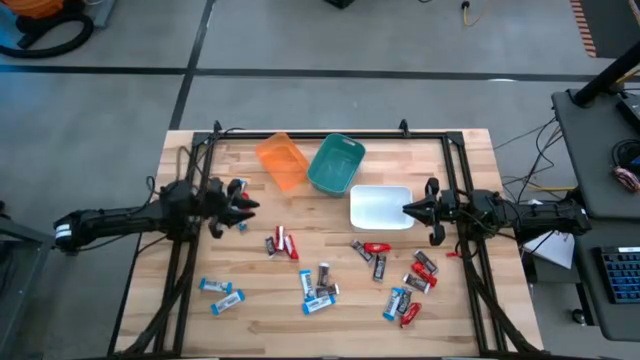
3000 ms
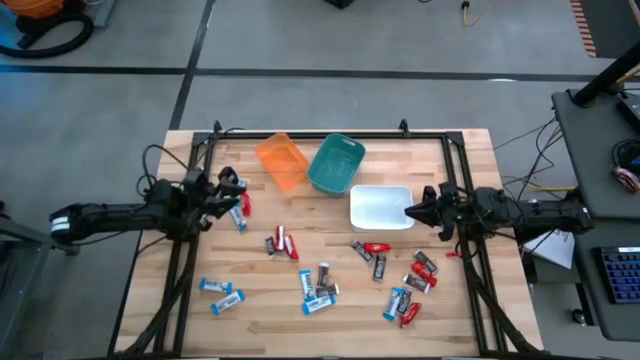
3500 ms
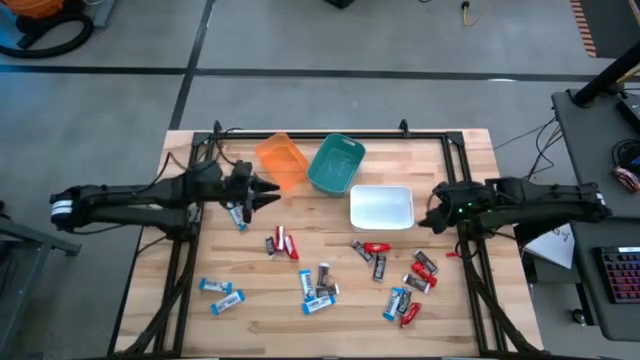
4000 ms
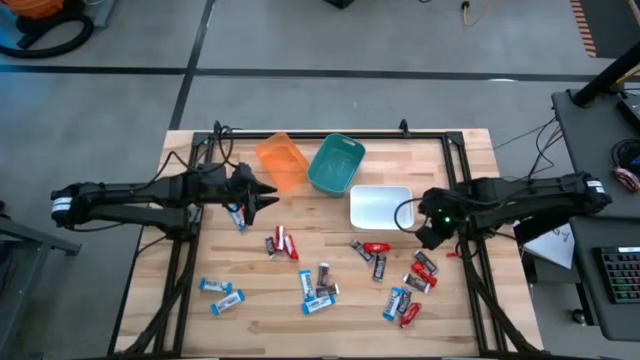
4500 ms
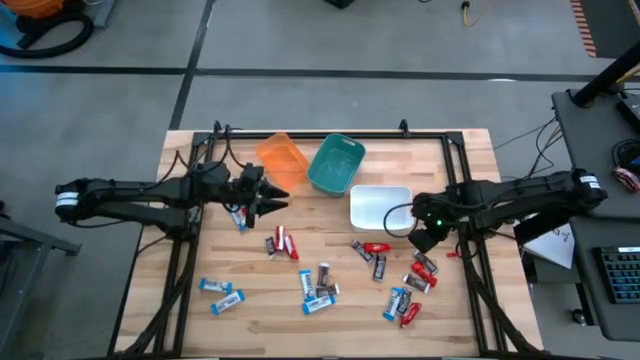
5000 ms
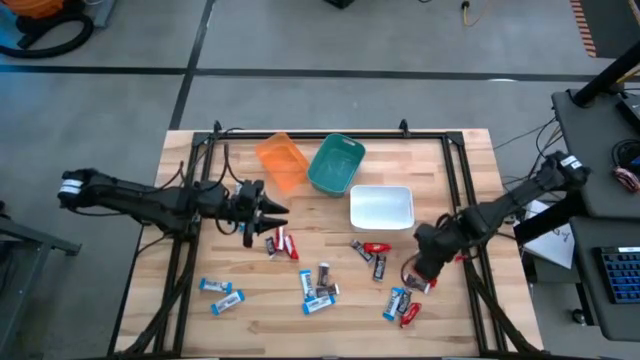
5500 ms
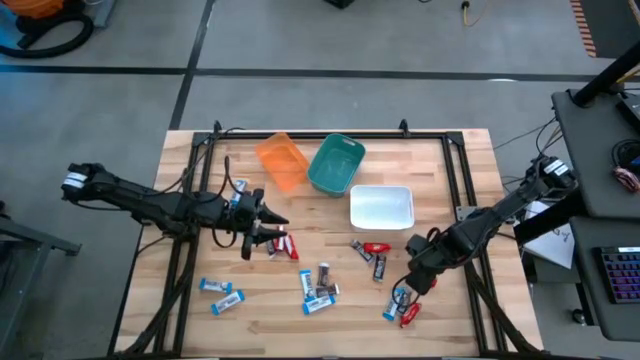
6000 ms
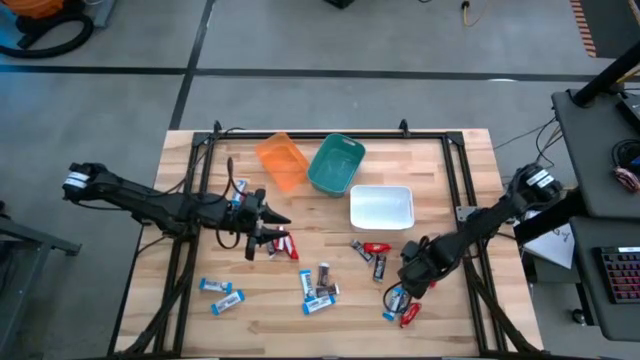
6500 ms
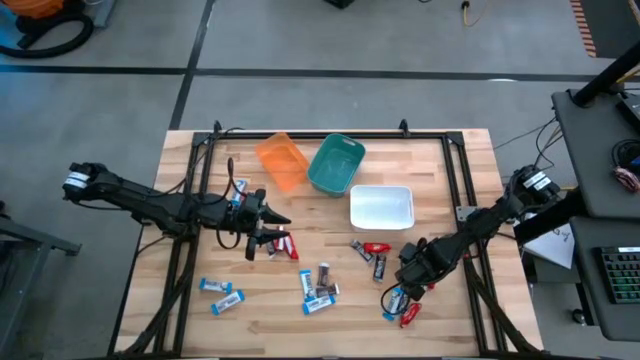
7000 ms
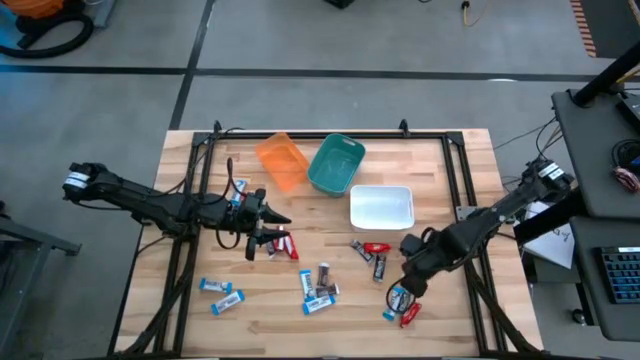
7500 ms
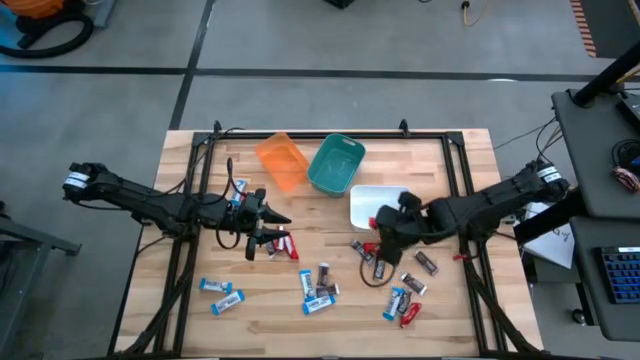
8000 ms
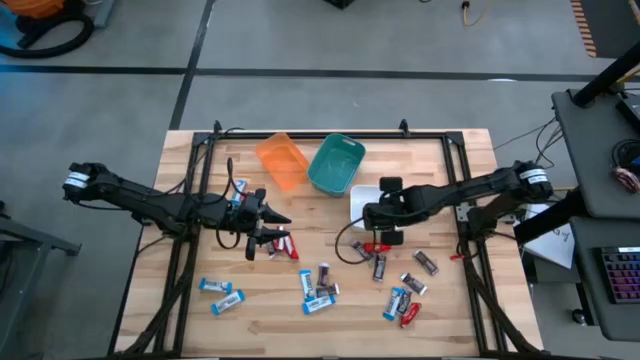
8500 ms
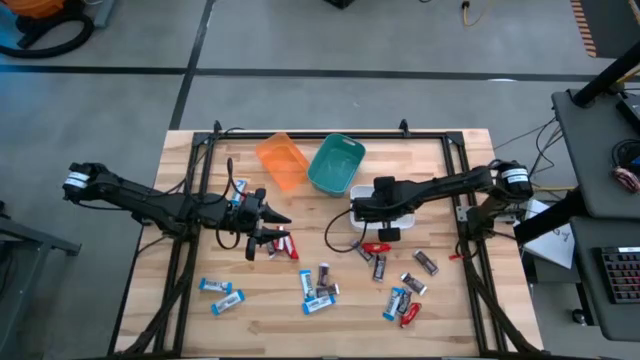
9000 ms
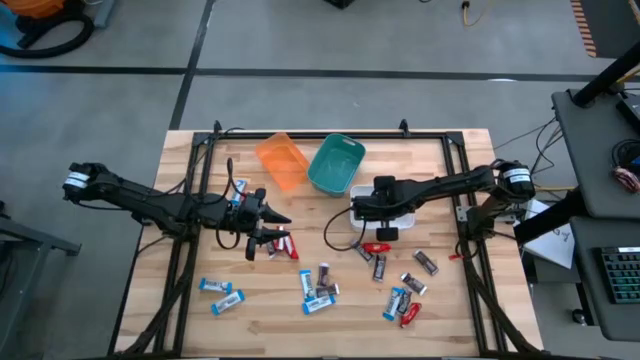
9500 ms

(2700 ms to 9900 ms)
Task: Sort candy
Put the red chocolate bar into the white bin

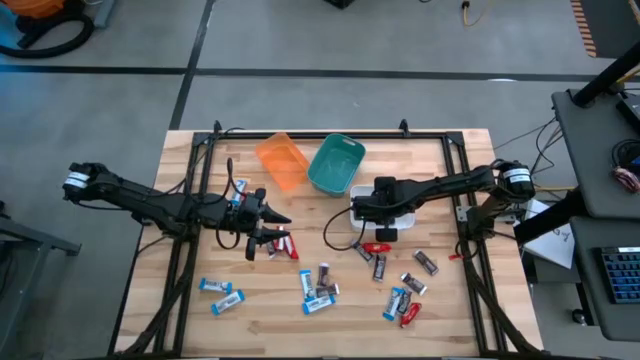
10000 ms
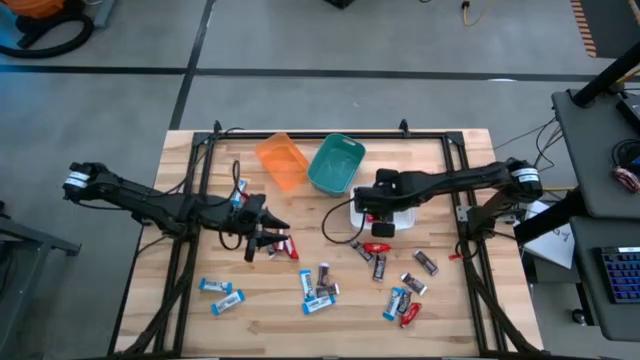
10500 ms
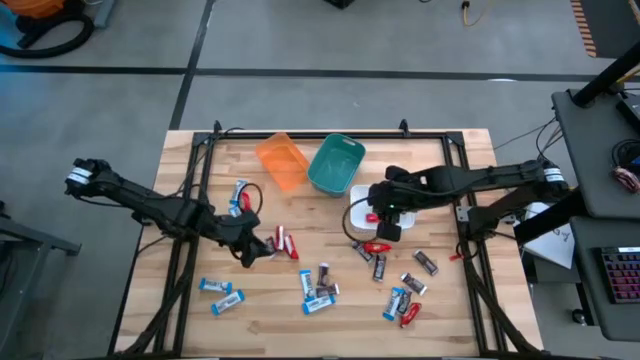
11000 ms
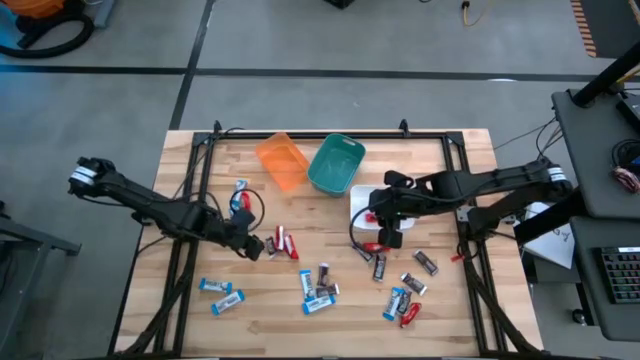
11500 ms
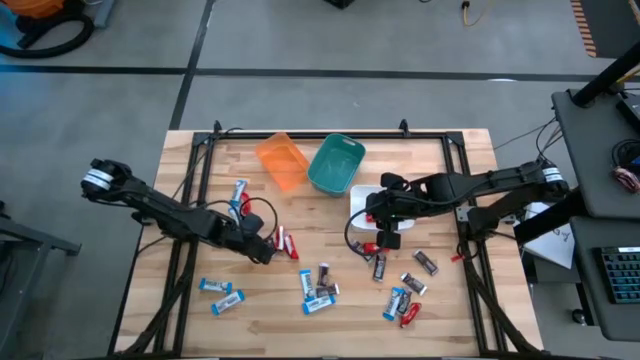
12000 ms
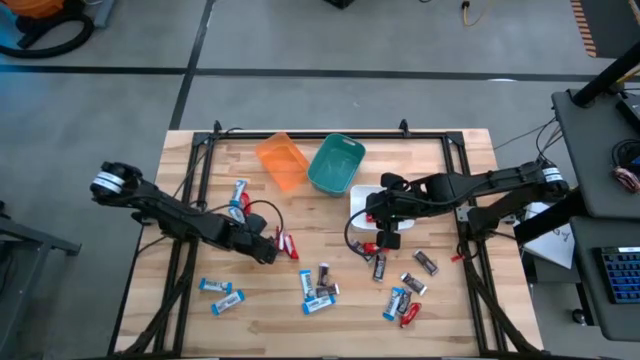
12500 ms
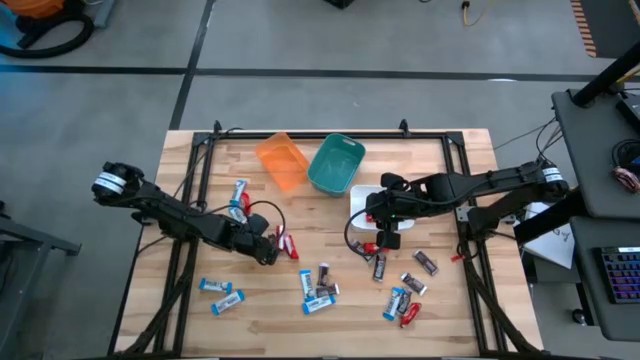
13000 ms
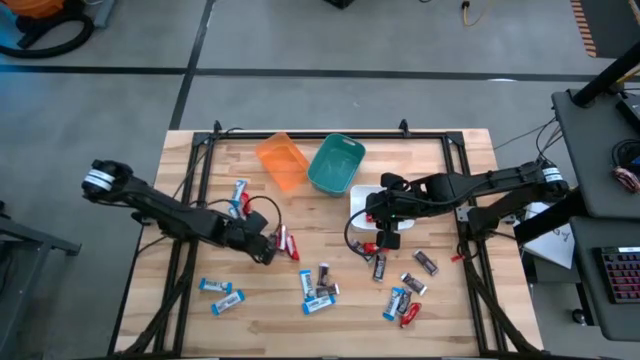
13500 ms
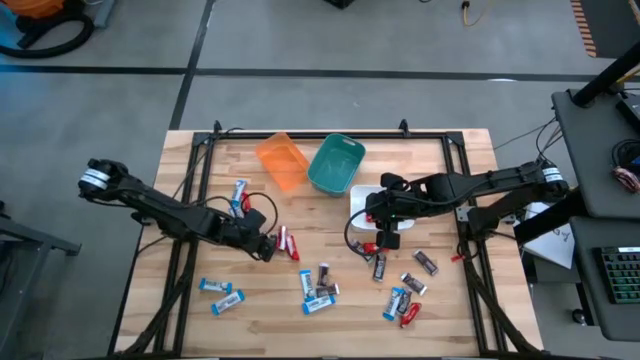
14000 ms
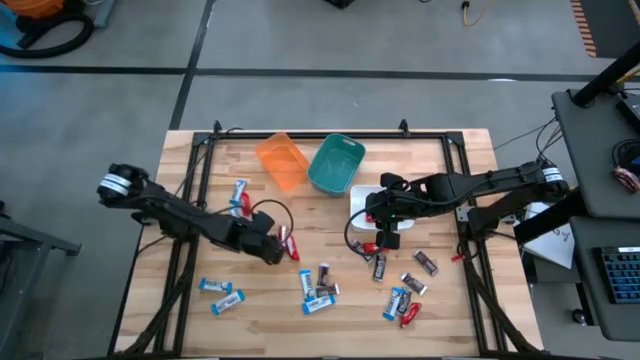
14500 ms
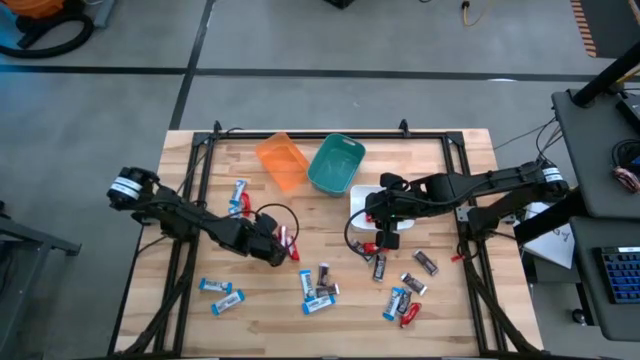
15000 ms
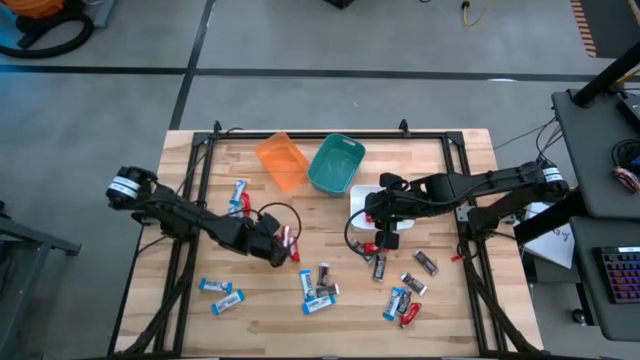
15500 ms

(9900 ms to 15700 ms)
Put the brown chocolate bar into the orange bin

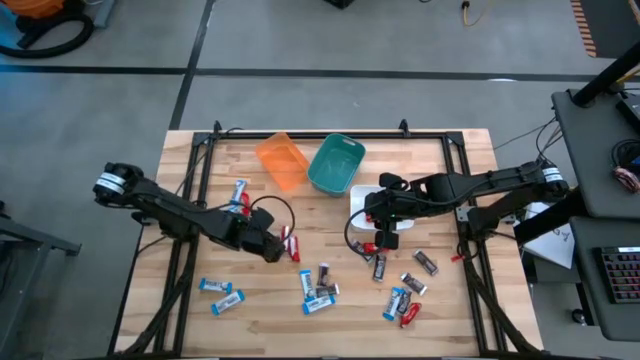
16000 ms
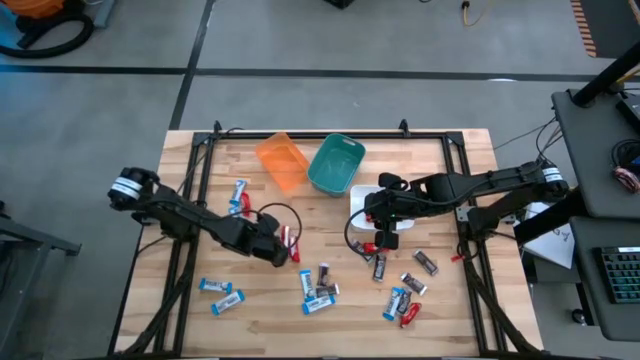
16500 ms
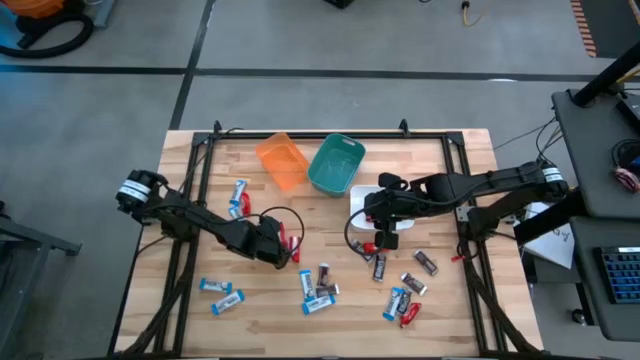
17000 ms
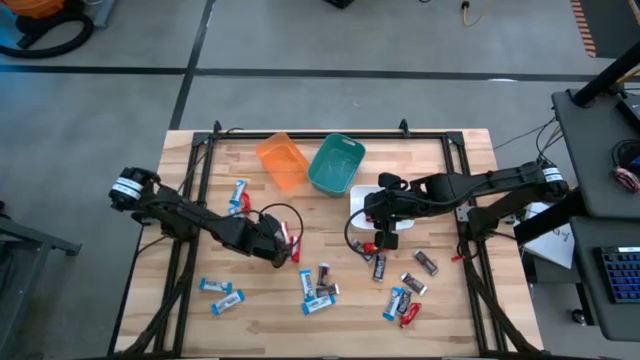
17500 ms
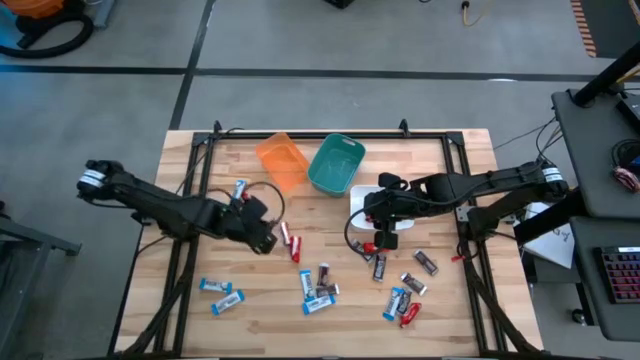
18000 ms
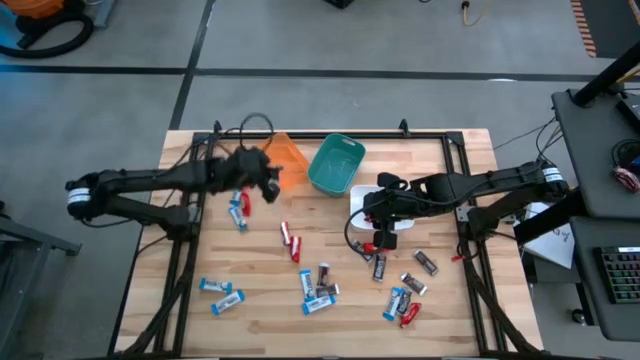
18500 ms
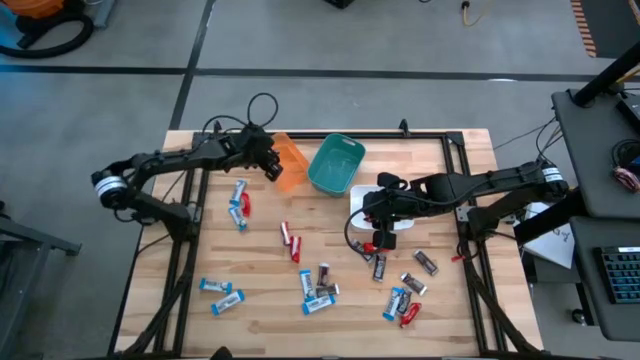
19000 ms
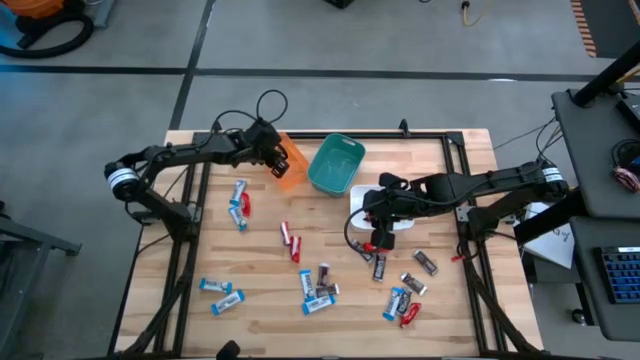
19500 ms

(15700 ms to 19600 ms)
Put the brown chocolate bar into the orange bin

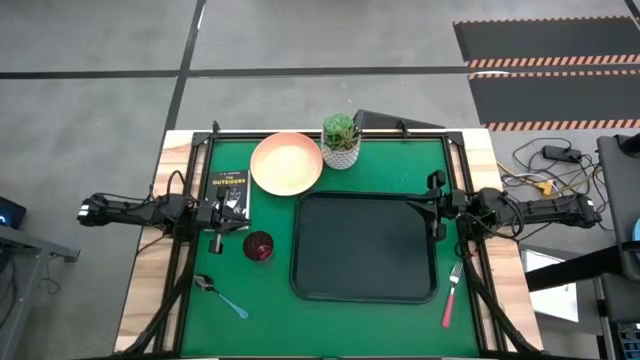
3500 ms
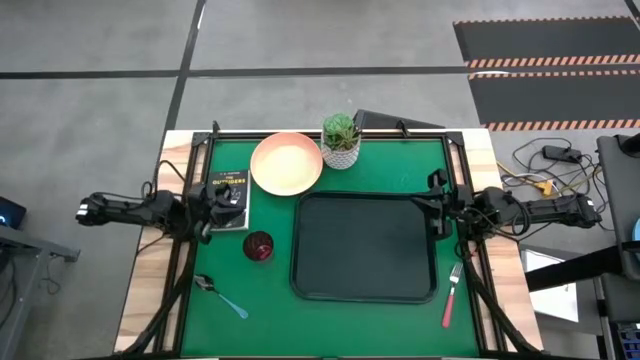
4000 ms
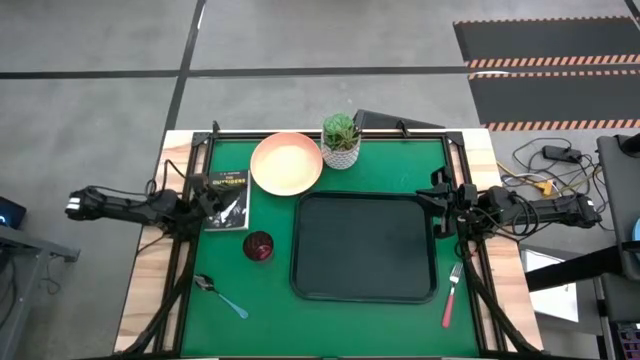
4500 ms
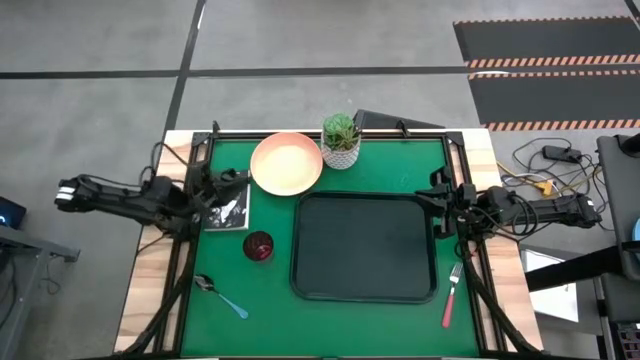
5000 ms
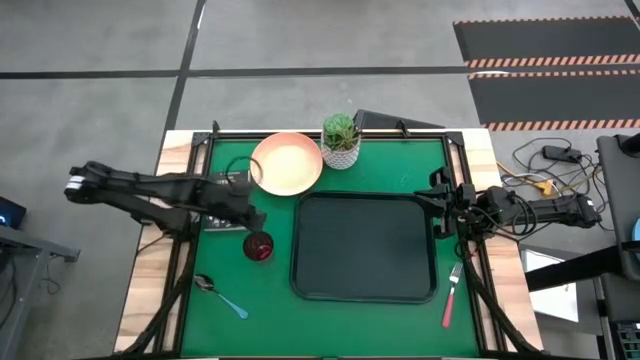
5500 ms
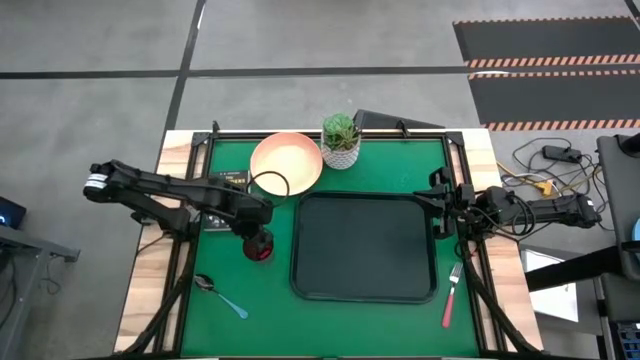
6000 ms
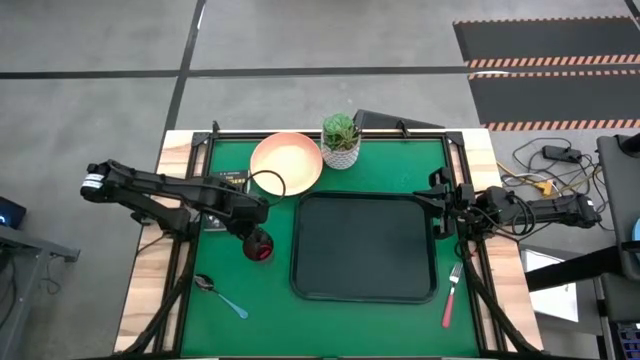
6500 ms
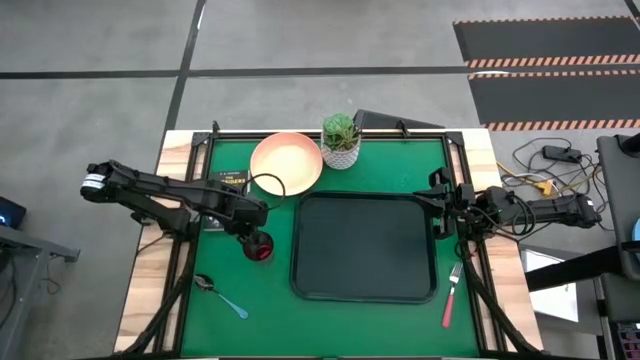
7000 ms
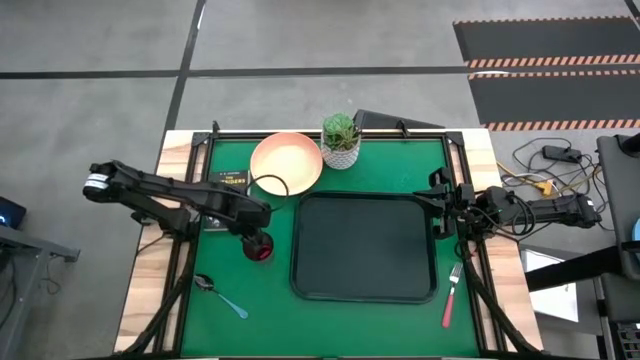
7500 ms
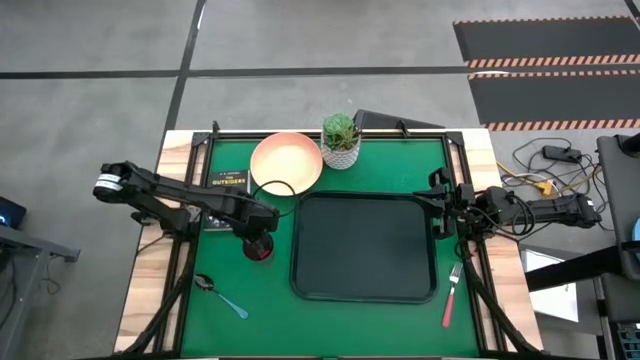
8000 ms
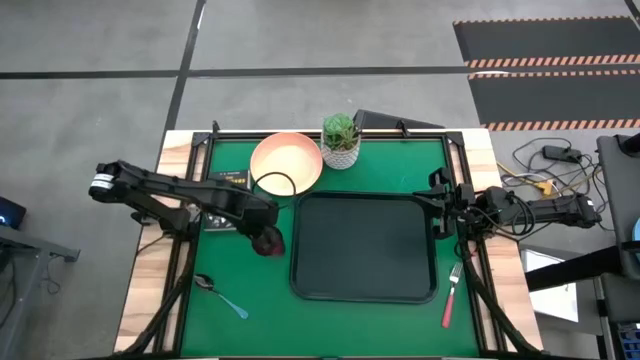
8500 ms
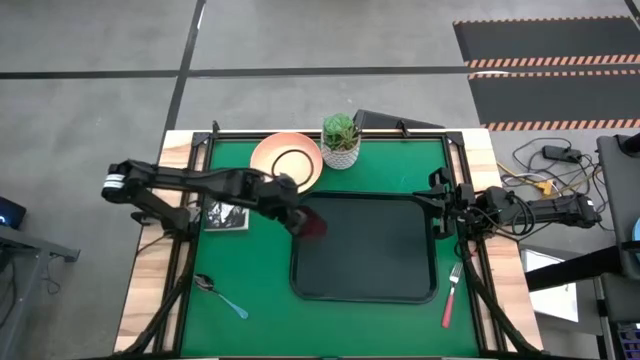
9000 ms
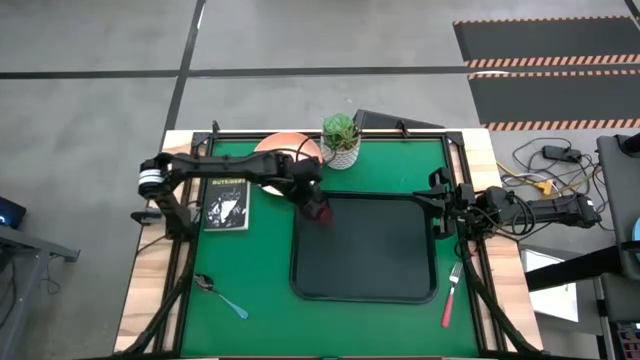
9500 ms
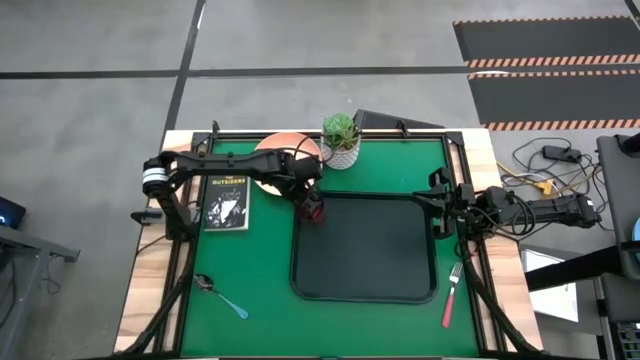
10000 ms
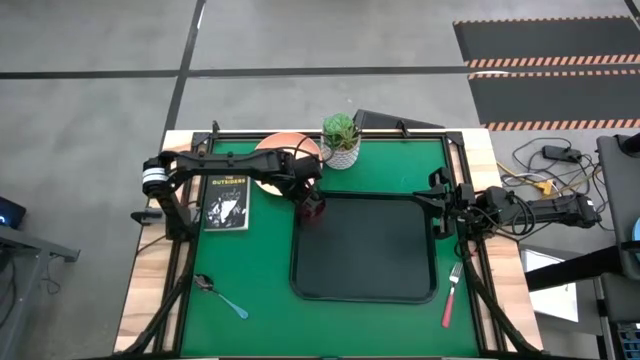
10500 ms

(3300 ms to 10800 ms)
Task: Pick and place plate/cup/fork/spoon on tray
Put the red glass on the top left of the black serving tray
